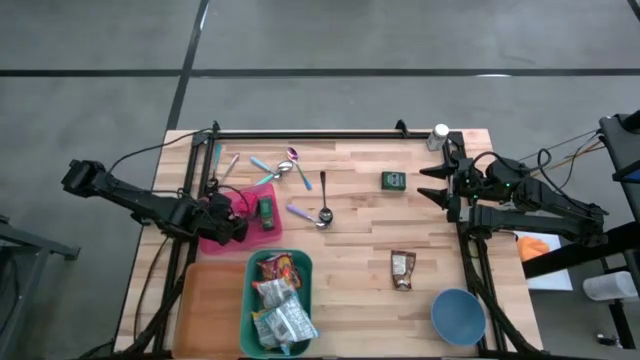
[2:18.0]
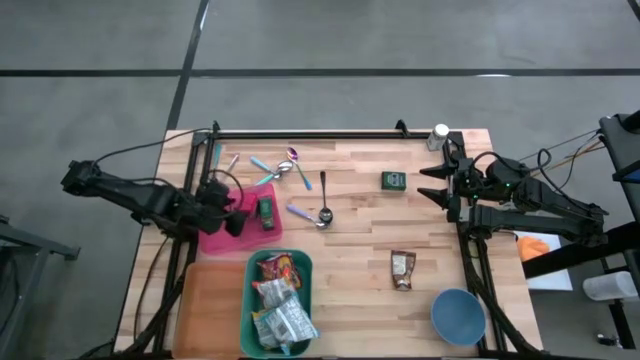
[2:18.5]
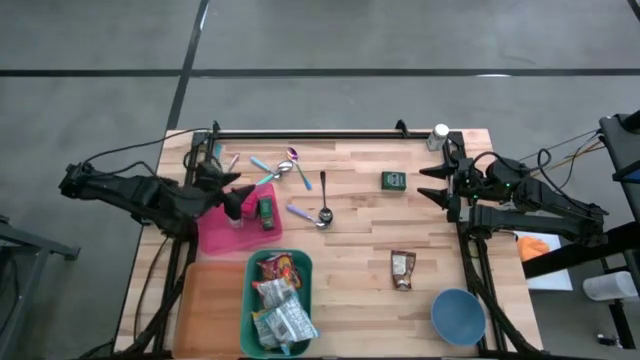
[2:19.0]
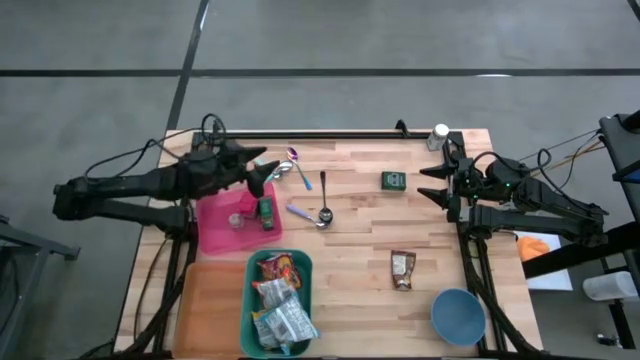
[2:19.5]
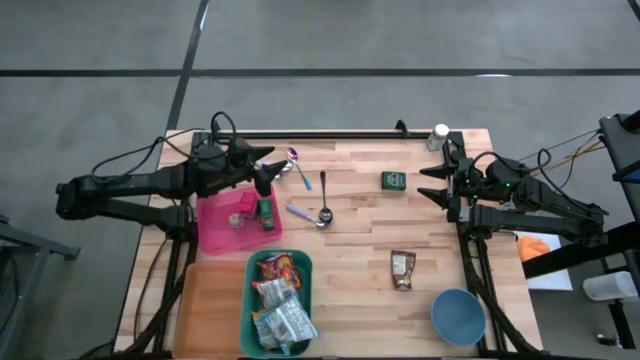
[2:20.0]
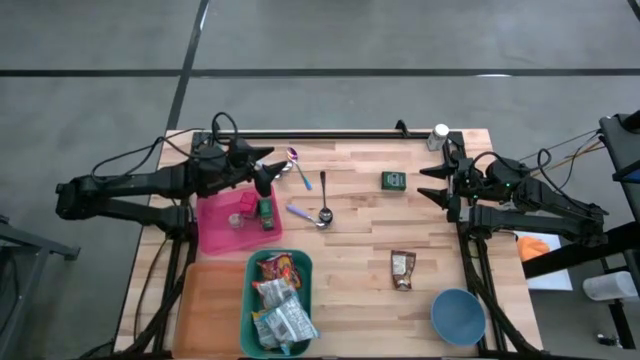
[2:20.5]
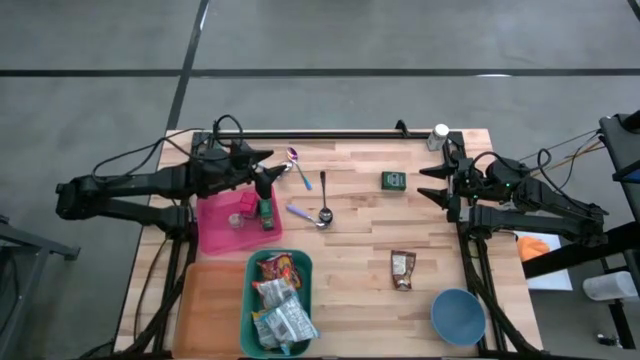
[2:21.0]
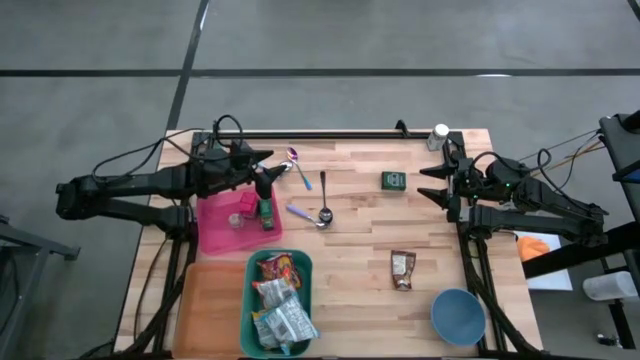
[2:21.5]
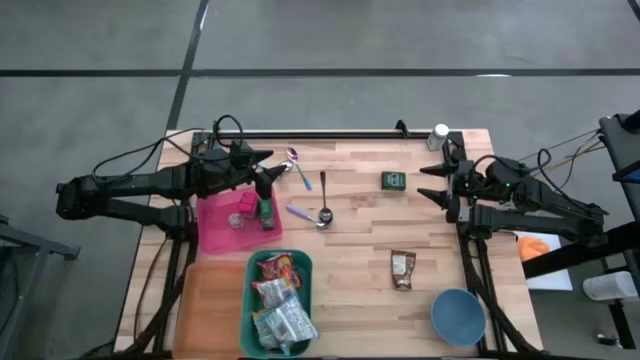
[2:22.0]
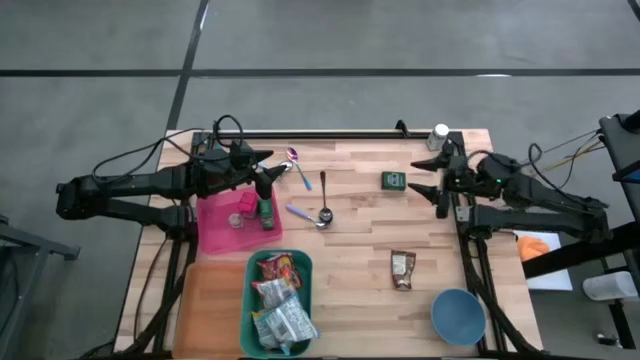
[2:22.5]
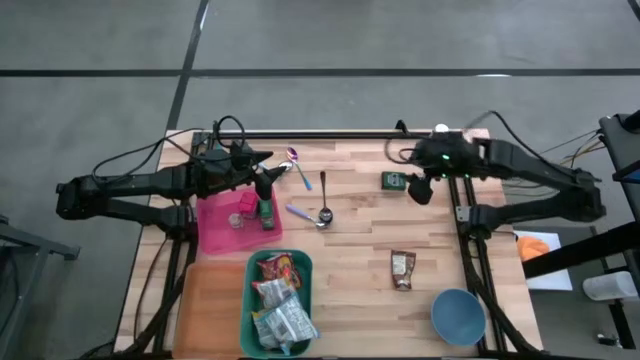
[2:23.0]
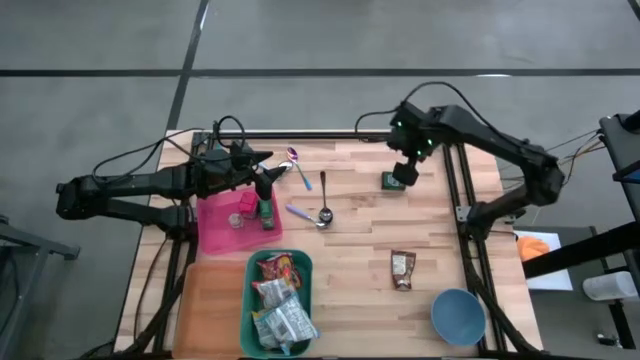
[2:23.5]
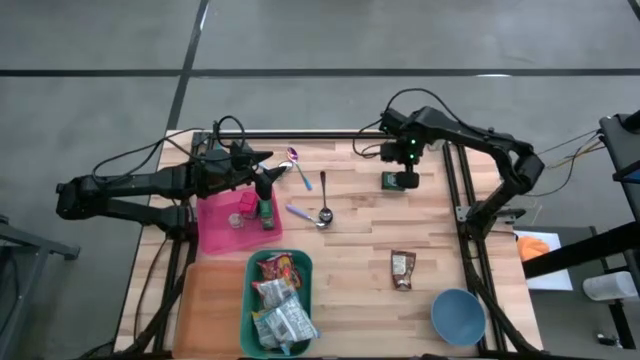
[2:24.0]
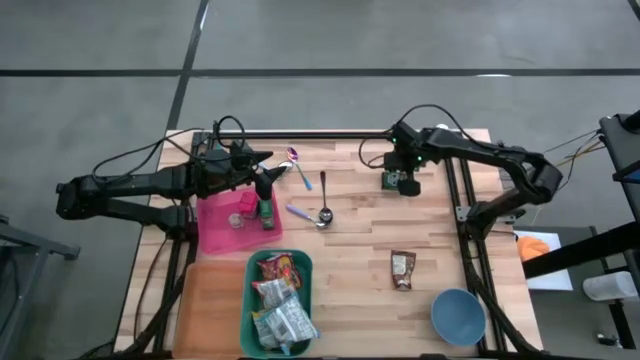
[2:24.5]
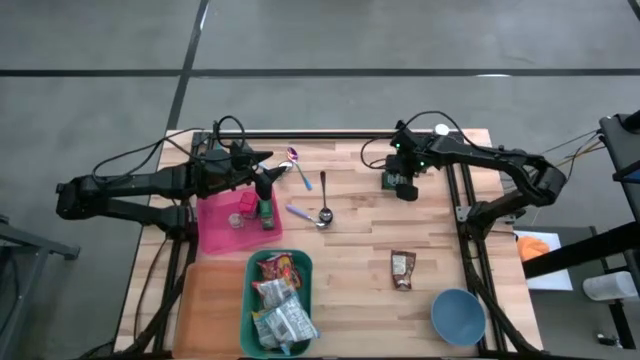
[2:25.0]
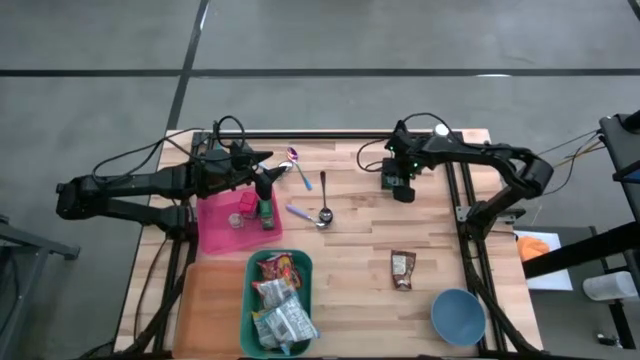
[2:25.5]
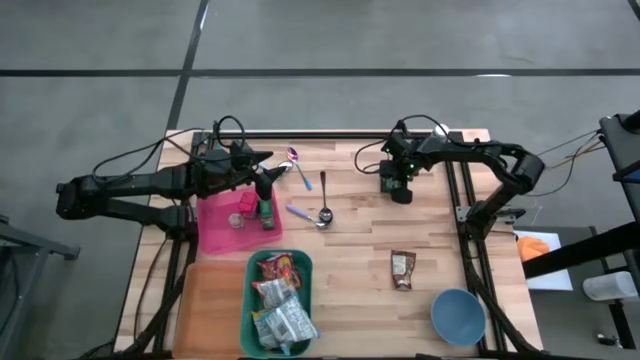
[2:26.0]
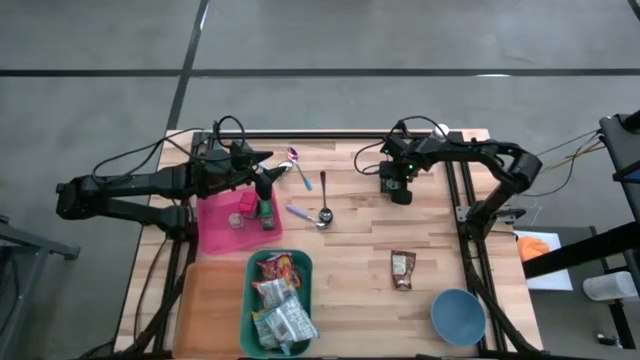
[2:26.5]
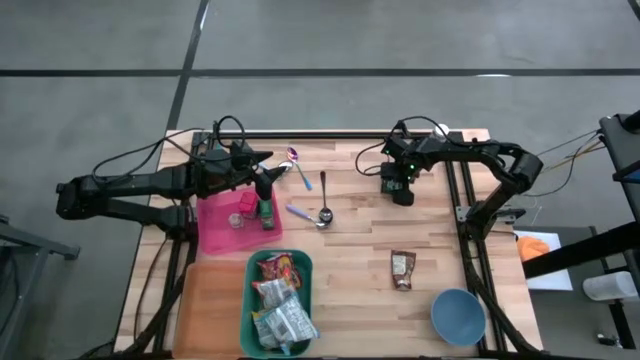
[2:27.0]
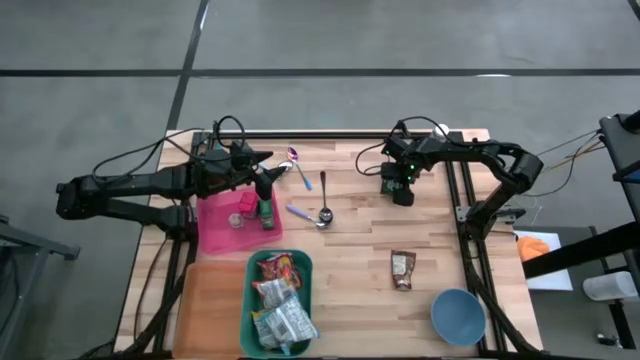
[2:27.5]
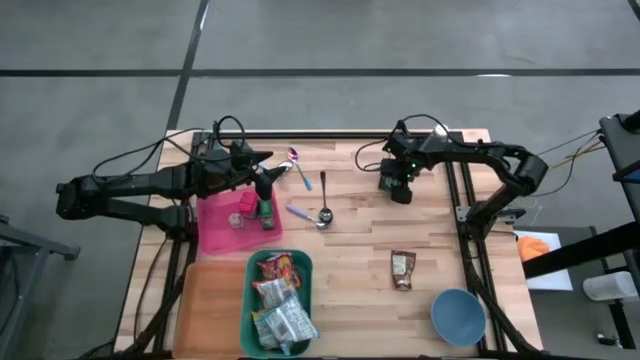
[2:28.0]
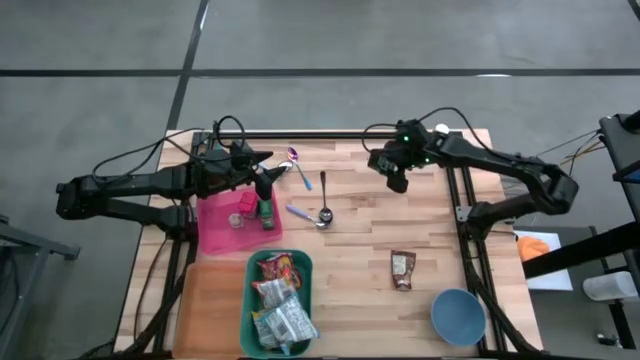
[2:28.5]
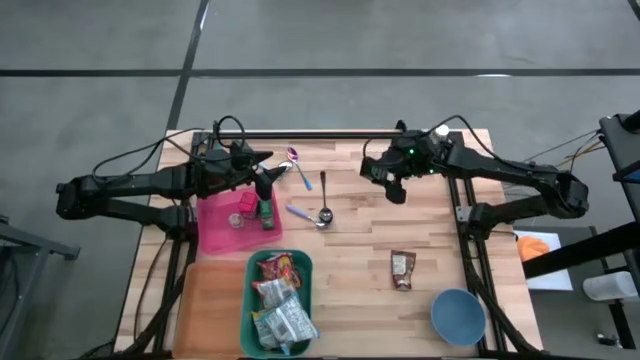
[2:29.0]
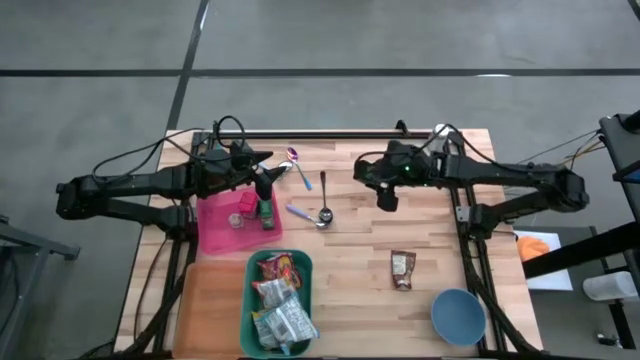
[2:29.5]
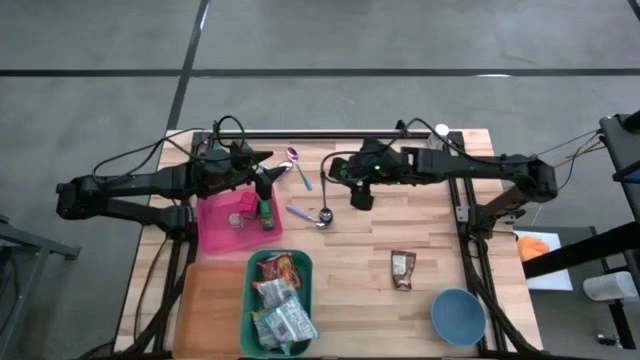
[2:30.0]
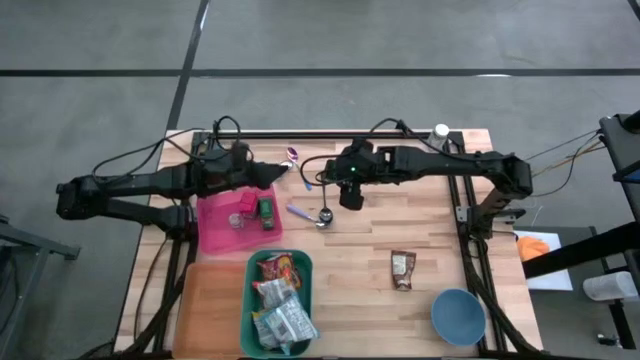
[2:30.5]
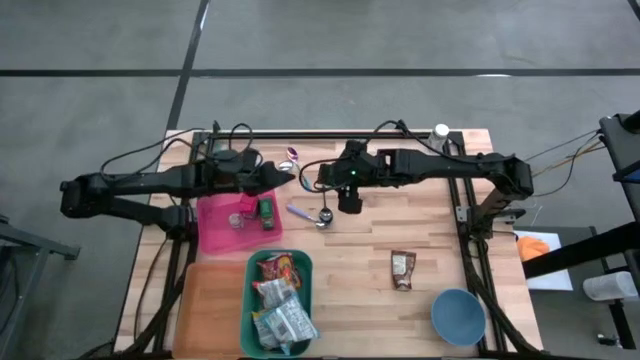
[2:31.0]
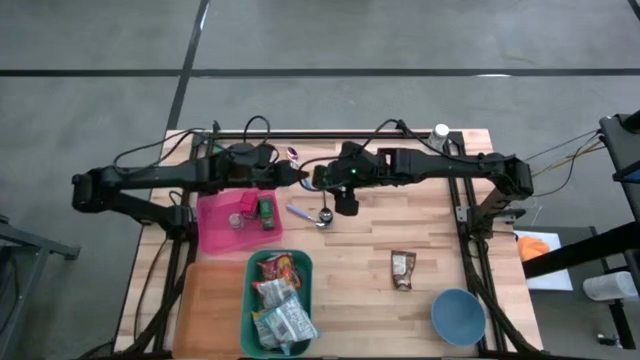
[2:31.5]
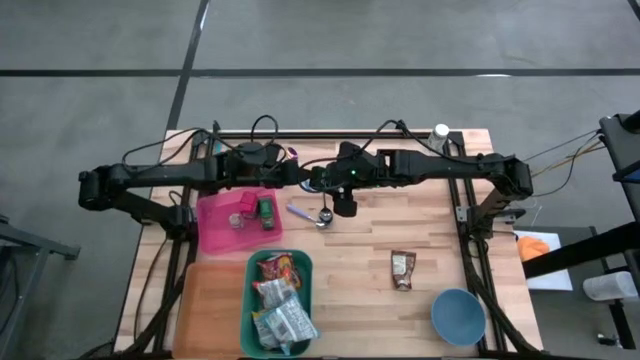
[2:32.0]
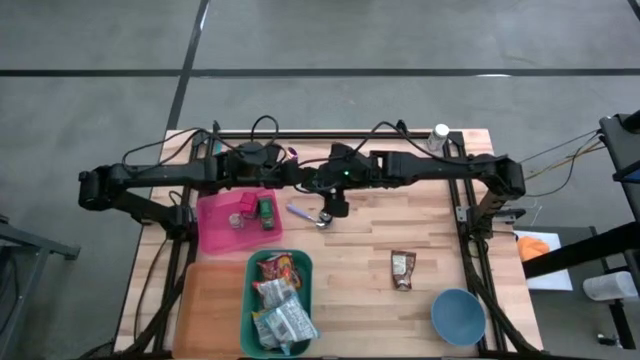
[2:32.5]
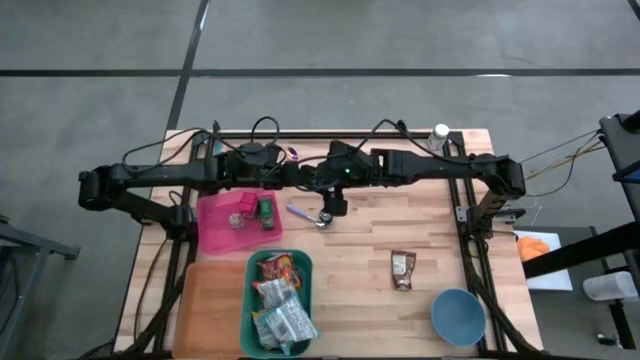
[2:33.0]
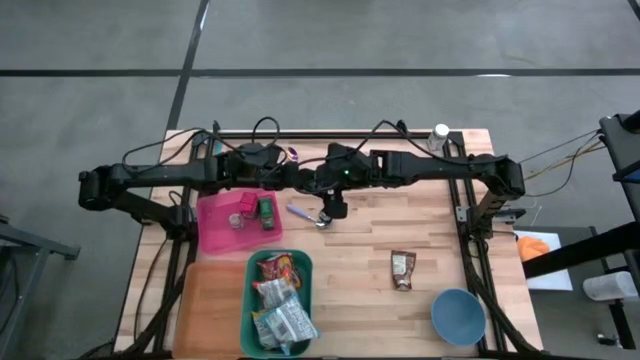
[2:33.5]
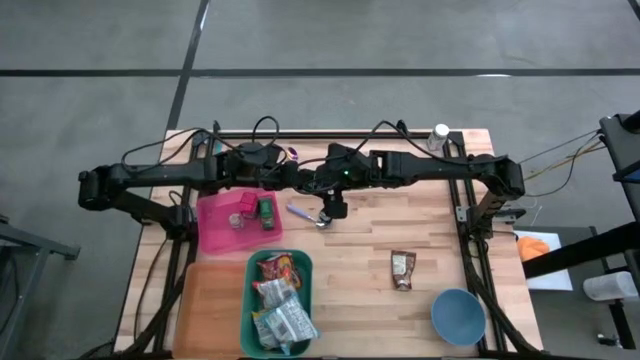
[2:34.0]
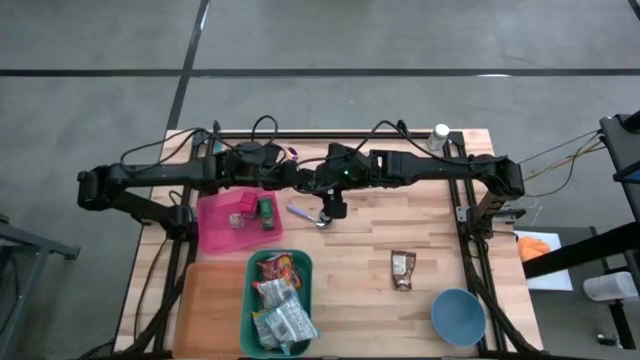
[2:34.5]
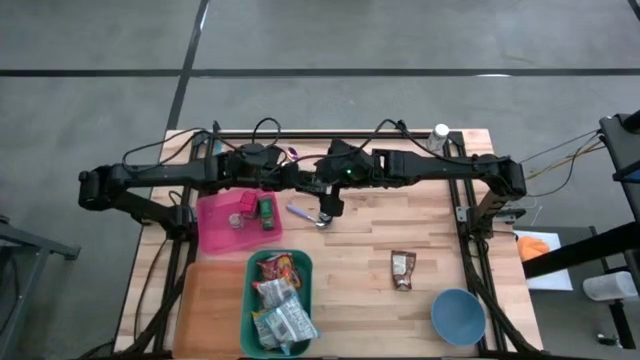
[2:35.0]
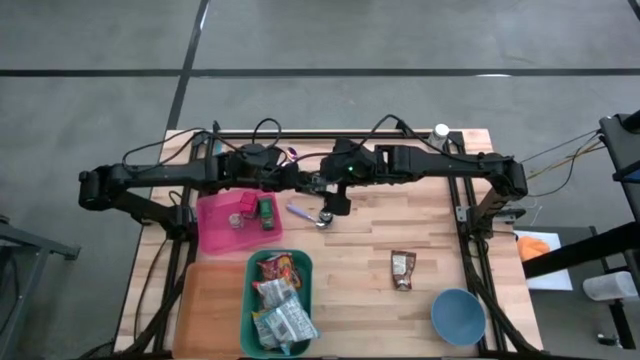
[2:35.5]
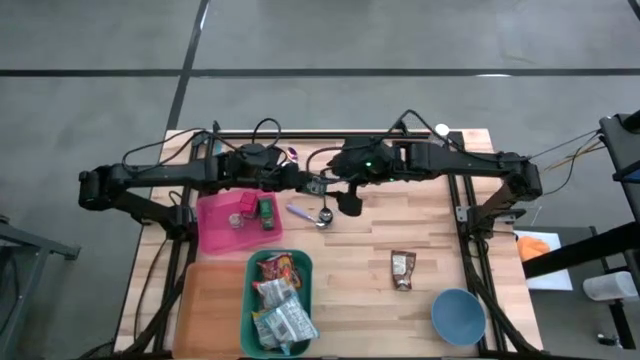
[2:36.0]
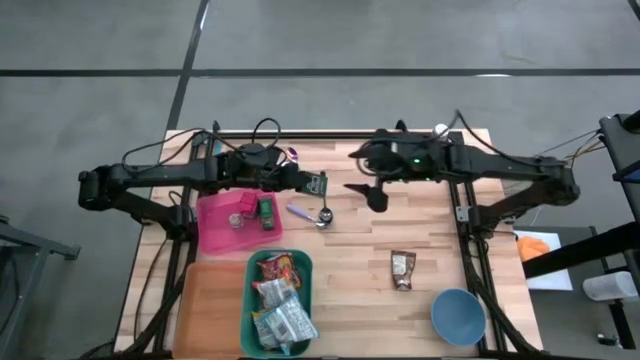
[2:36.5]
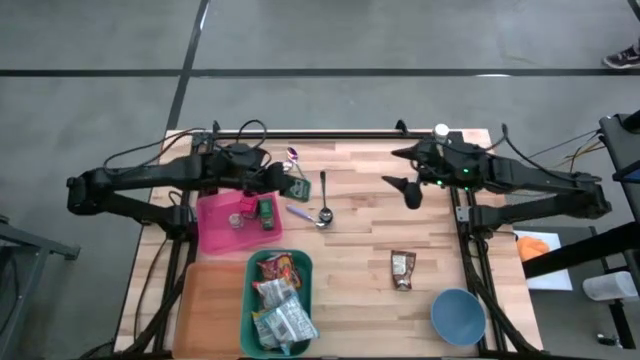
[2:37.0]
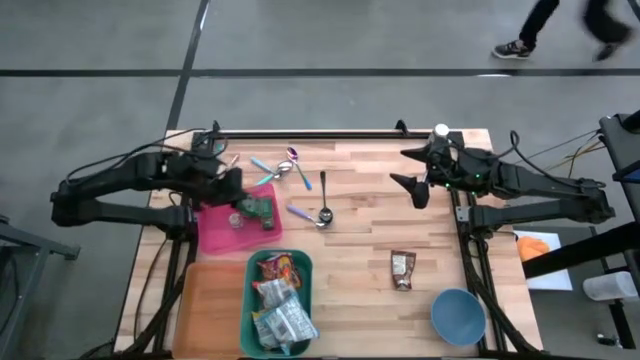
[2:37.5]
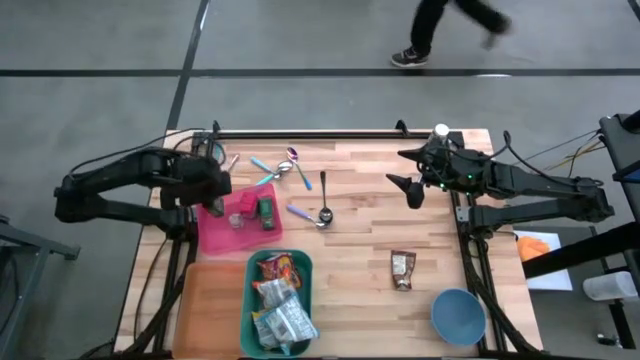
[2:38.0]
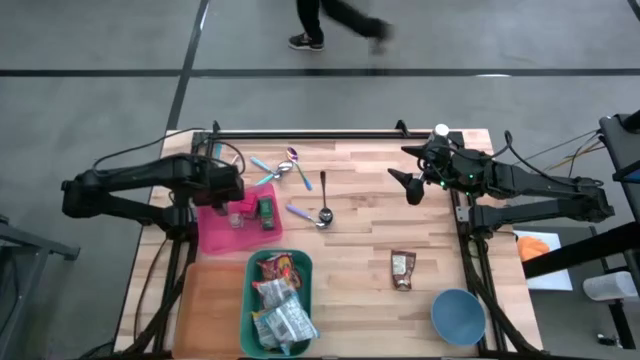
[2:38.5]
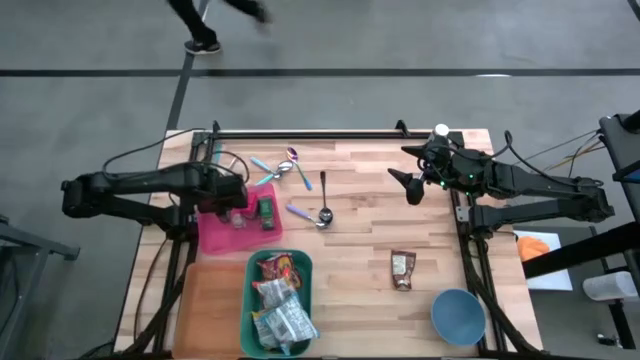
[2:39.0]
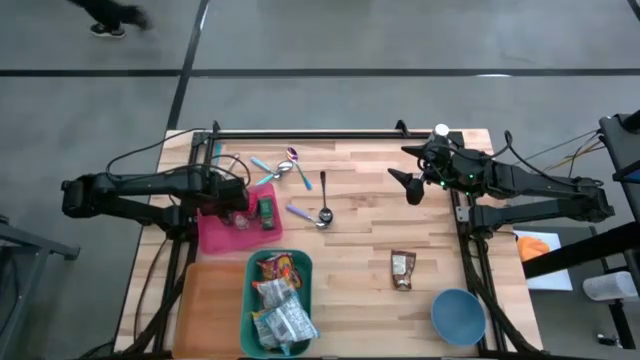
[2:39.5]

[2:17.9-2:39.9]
Put the green seasoning can into the pink bin
